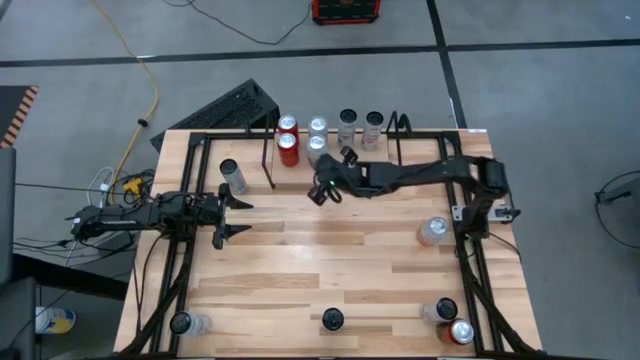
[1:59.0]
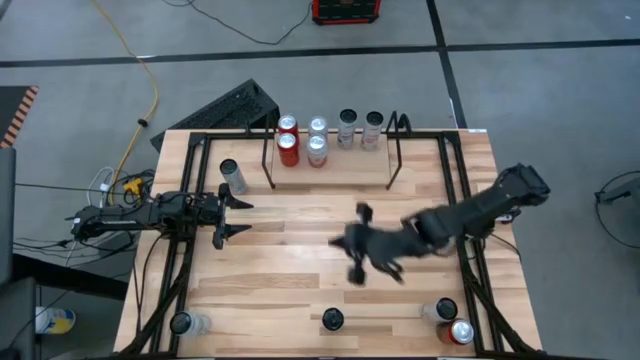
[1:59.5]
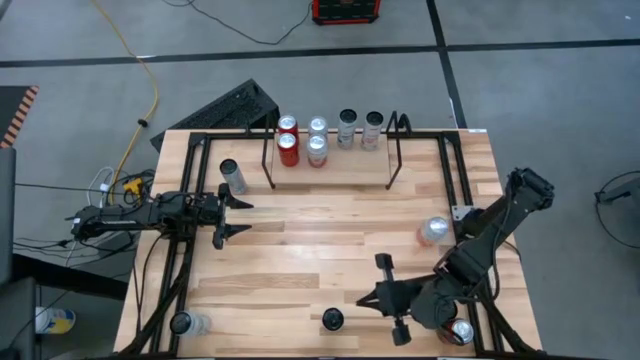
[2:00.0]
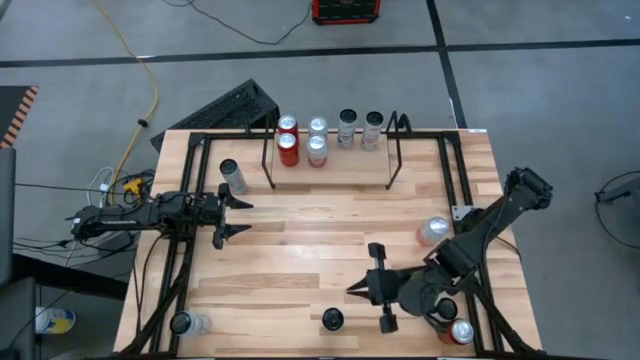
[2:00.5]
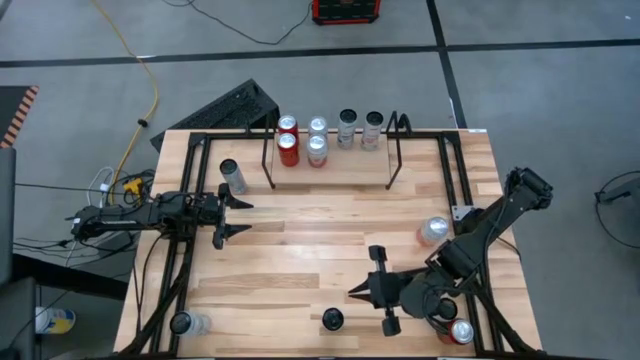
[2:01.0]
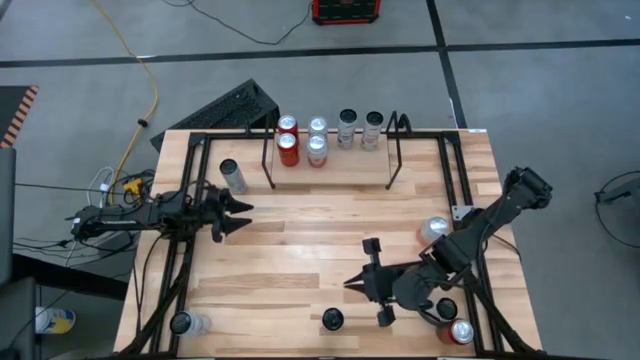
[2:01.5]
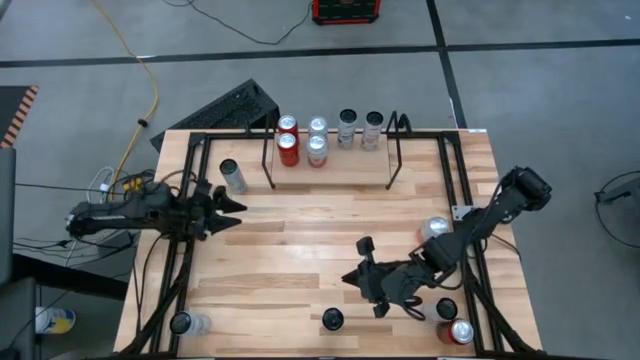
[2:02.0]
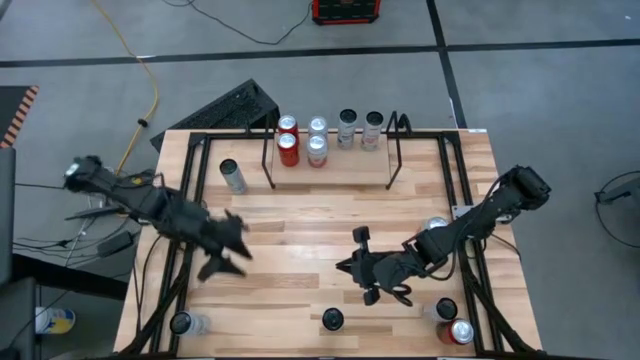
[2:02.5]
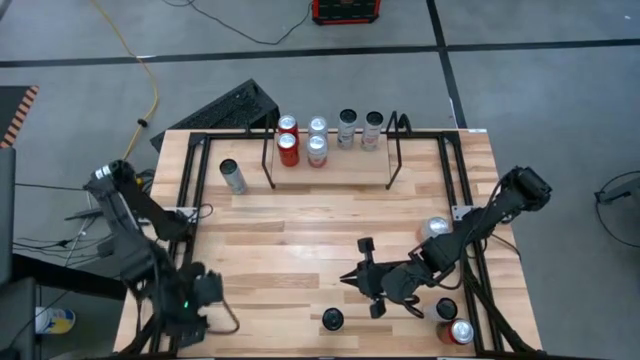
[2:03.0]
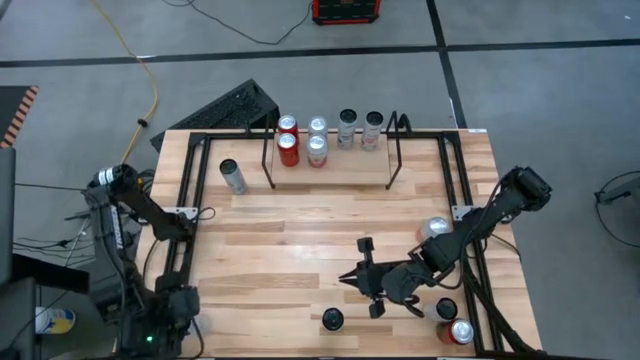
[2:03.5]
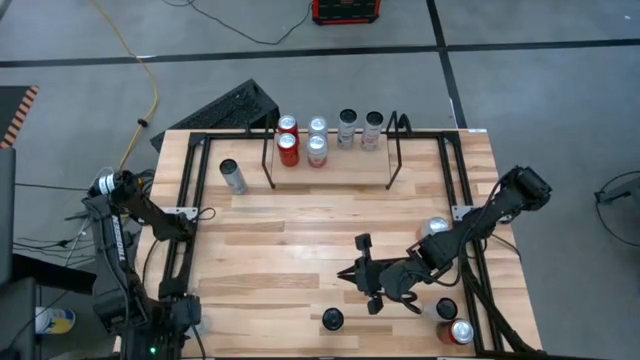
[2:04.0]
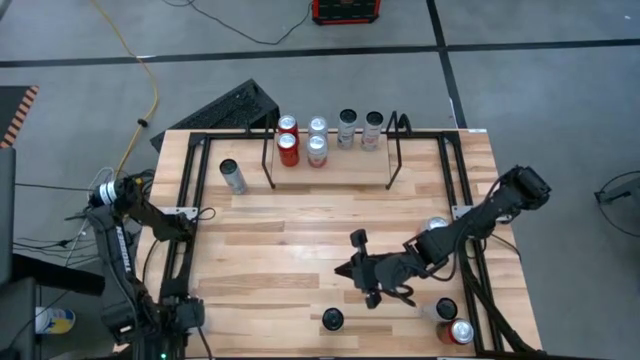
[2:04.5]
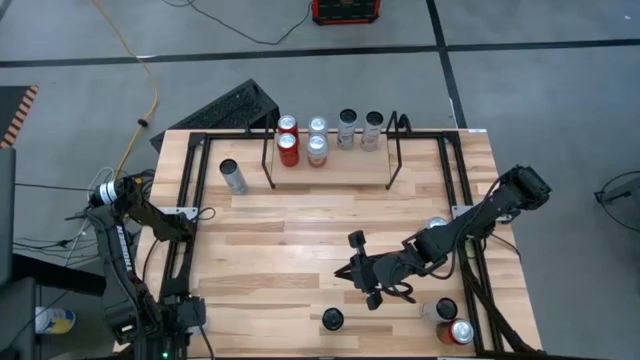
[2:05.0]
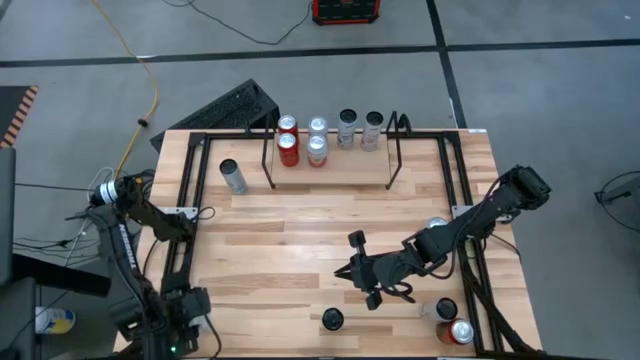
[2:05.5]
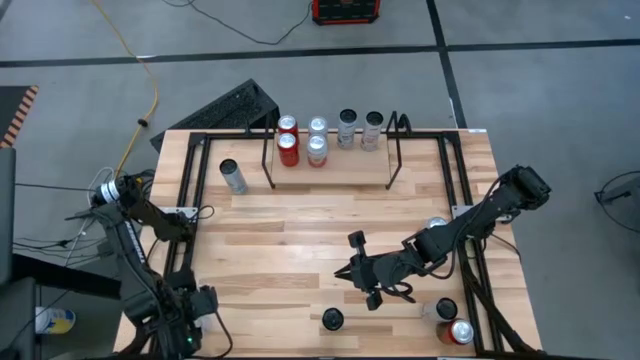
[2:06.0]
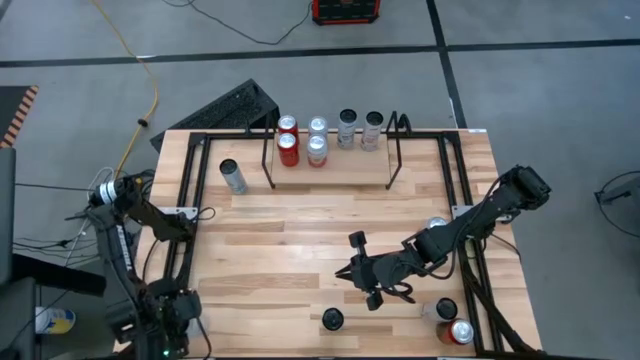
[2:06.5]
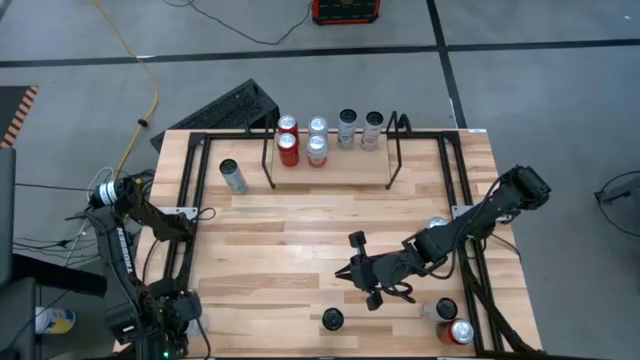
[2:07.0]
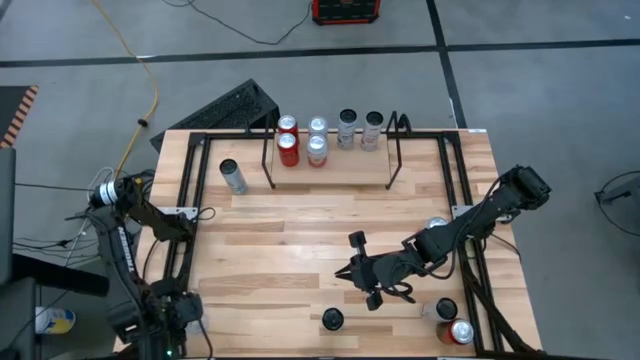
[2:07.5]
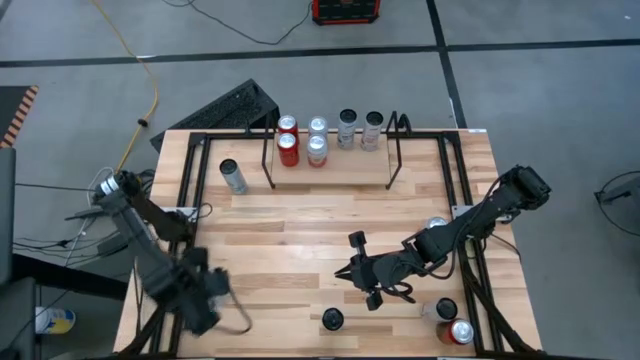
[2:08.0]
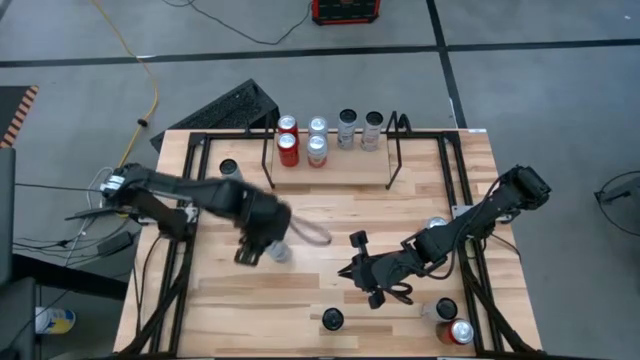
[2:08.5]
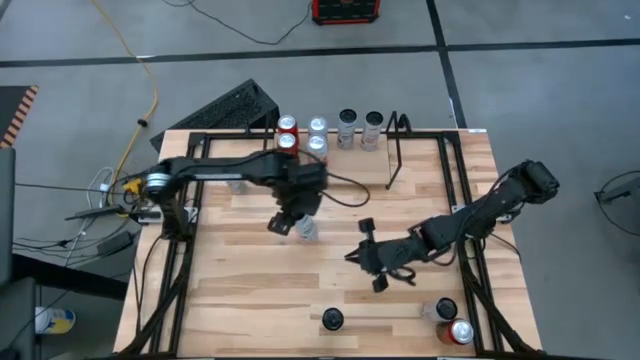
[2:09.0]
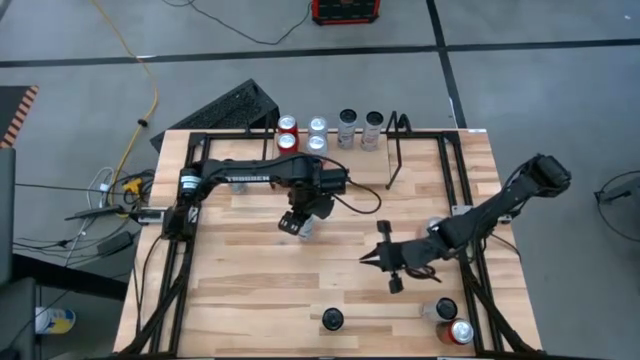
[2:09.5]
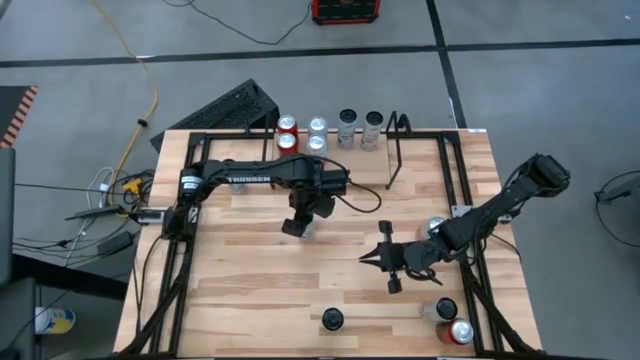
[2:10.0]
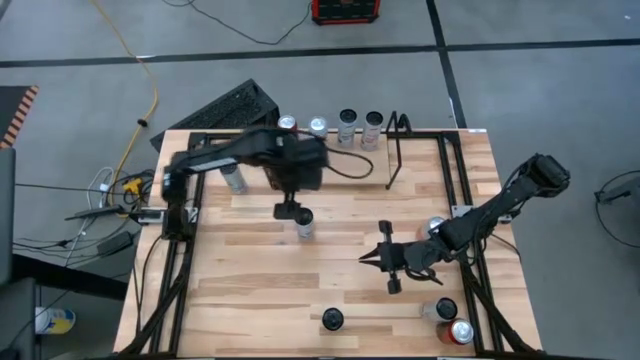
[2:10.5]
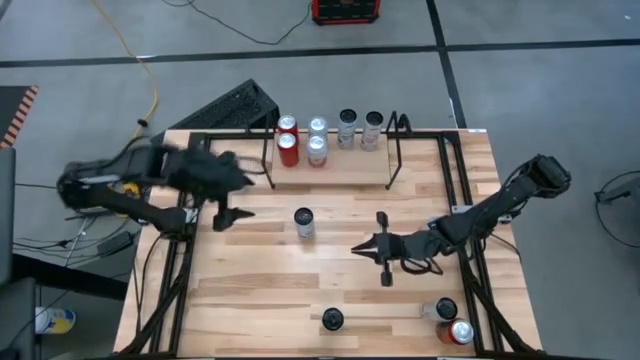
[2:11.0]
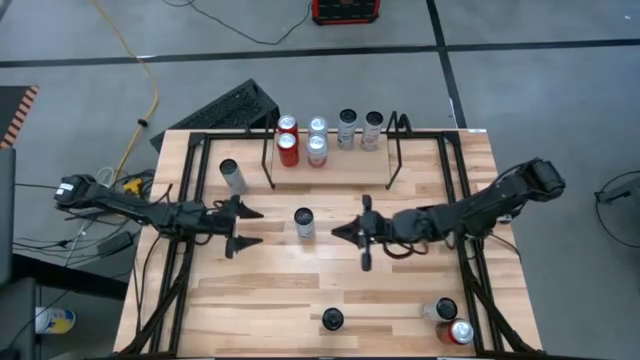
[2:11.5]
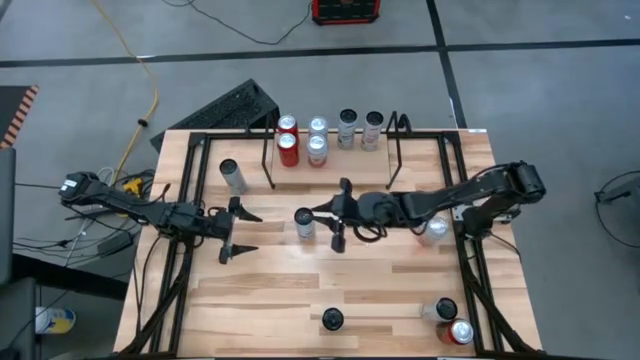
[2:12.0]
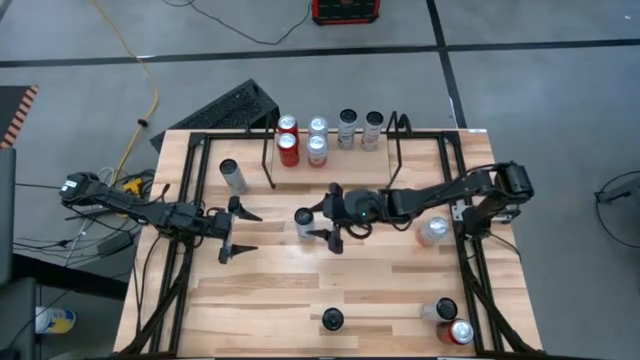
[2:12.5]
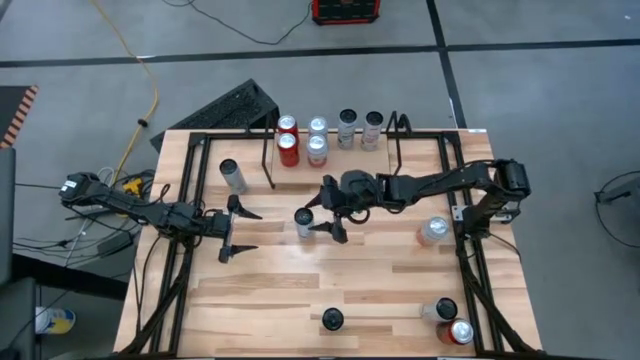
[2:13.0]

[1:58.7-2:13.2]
Task: Place canned beverage on shelf
Put the bottom white blue soda can on the shelf and align with other white blue soda can

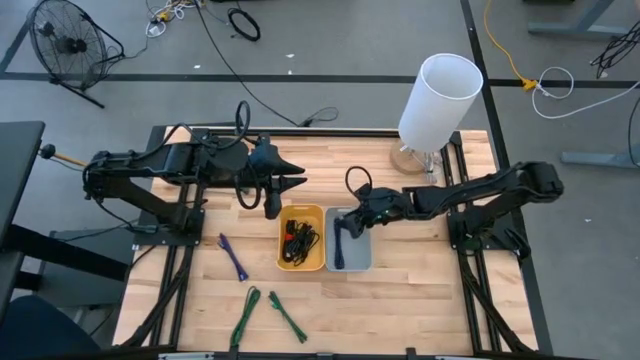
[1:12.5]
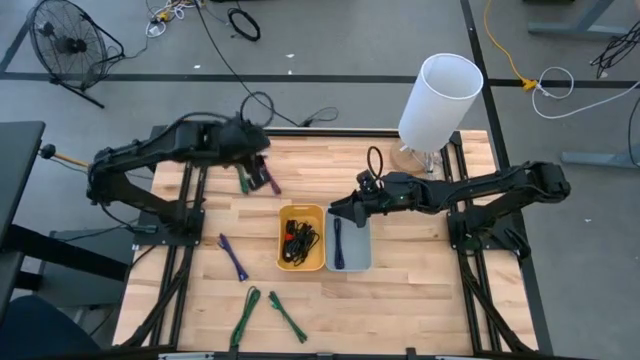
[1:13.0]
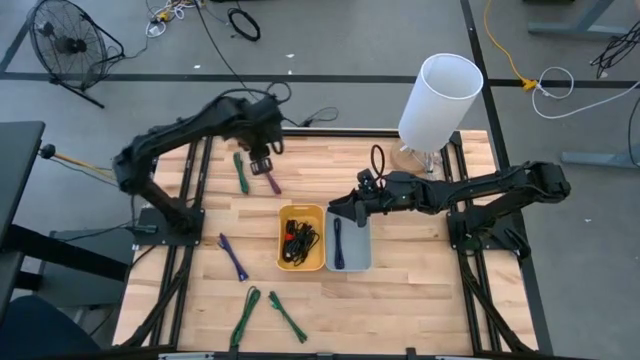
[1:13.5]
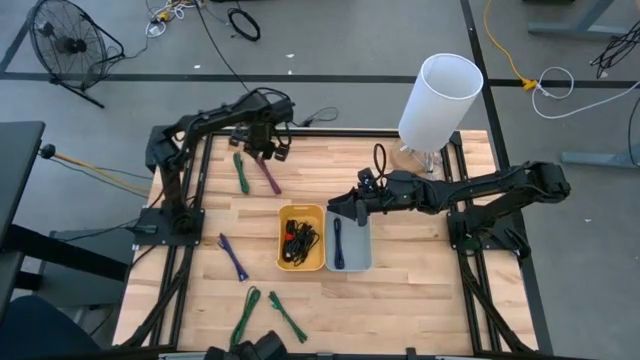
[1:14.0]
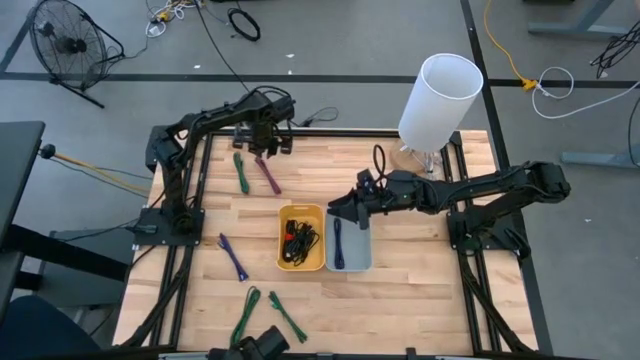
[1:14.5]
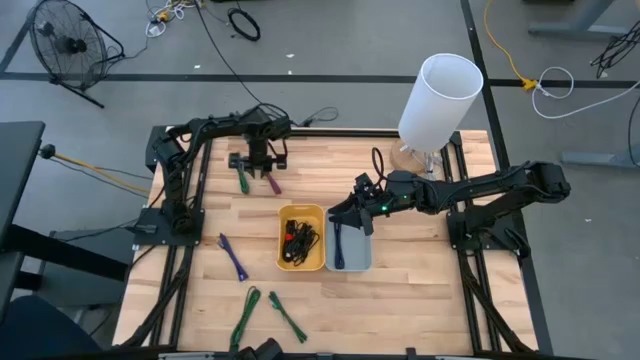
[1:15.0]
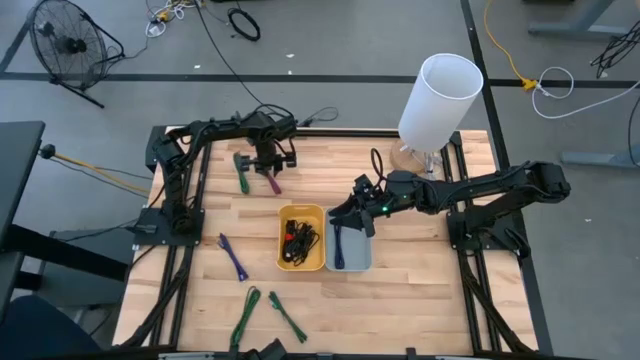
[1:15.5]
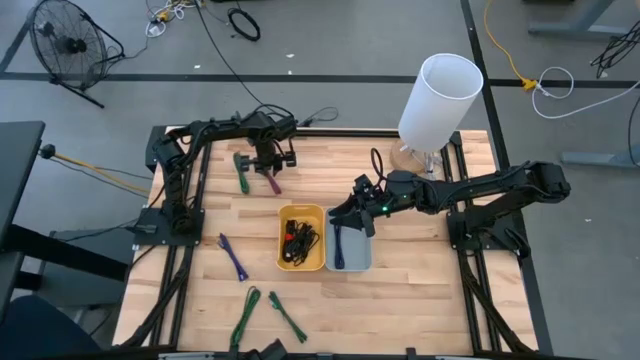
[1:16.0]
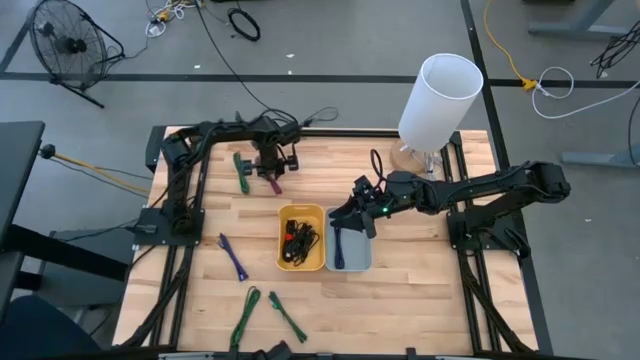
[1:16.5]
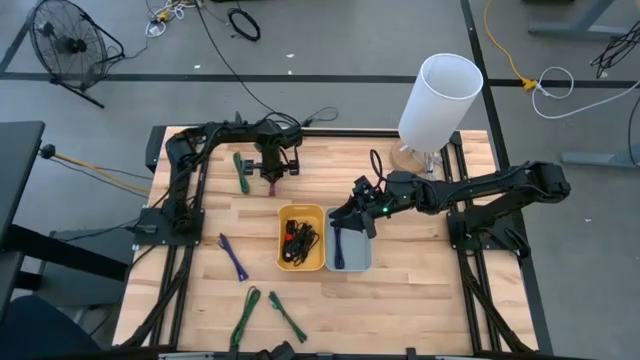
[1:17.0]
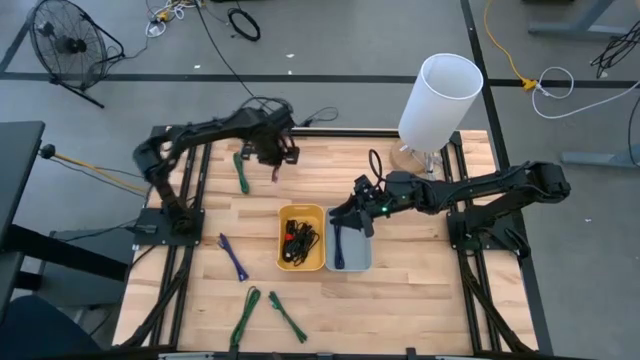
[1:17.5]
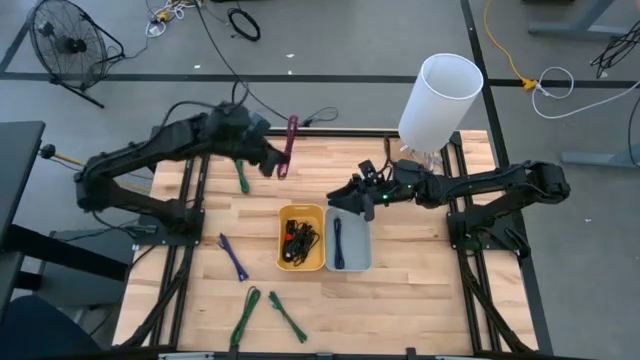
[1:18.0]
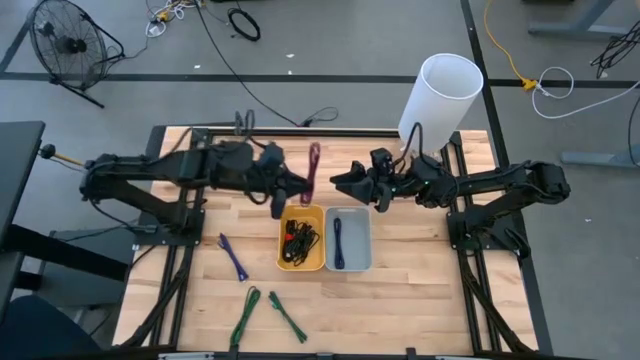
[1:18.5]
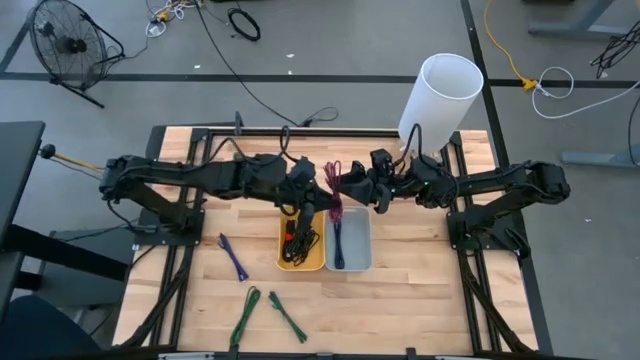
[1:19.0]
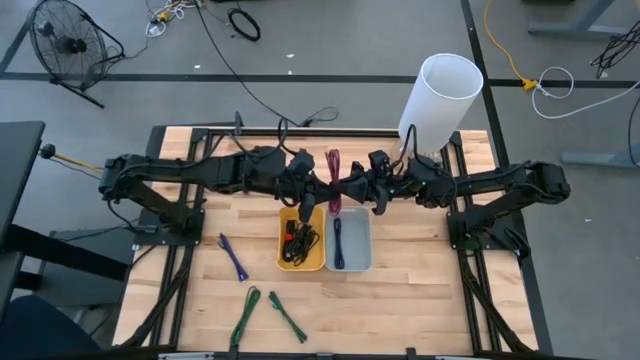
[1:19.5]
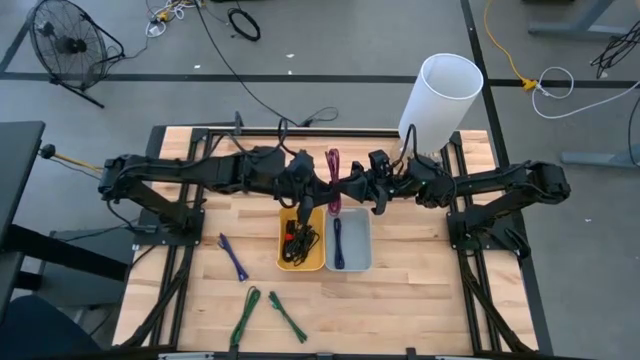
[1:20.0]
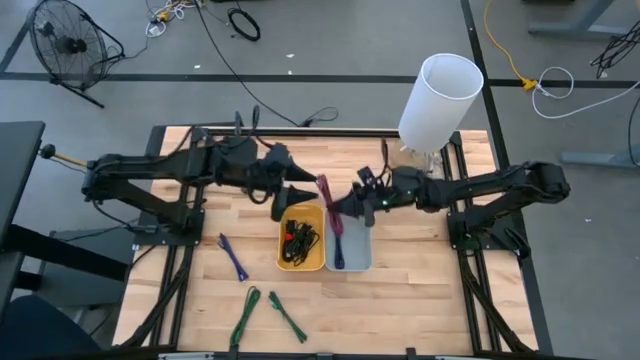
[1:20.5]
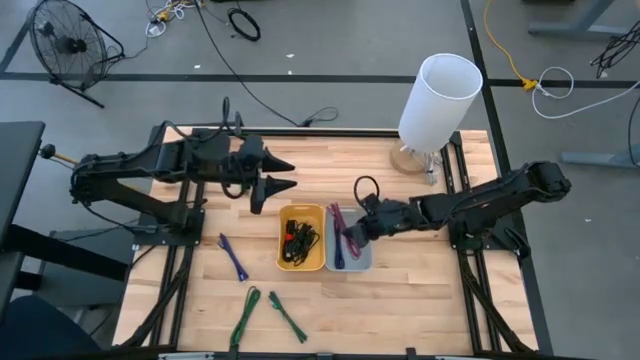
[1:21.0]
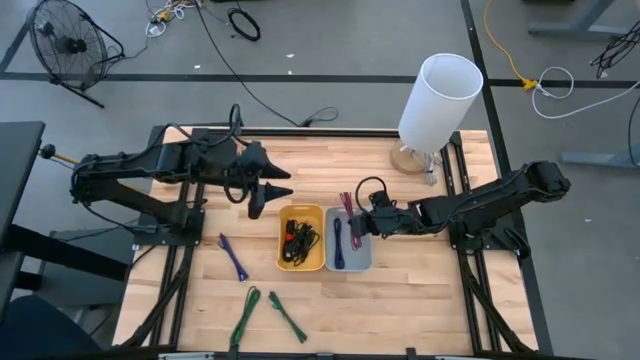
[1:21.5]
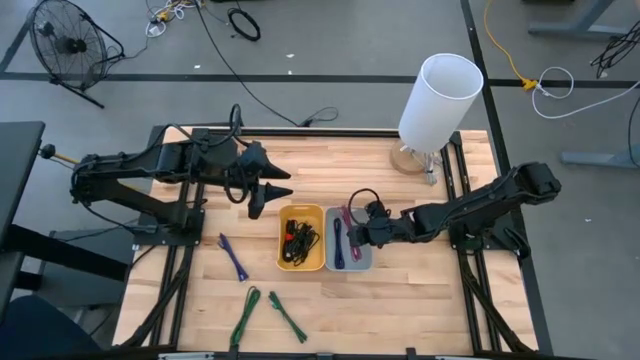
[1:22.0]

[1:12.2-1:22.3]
Task: Pick & Place USB Port
Put the black pink charger cable into the gray bin
